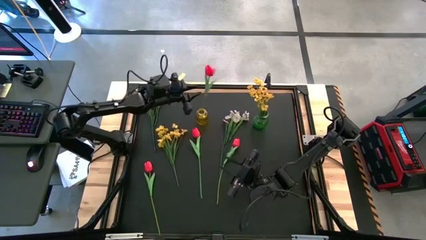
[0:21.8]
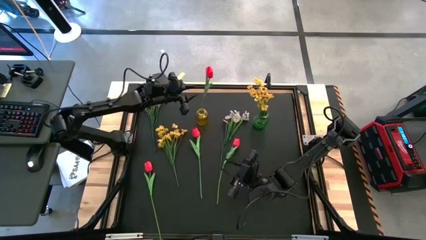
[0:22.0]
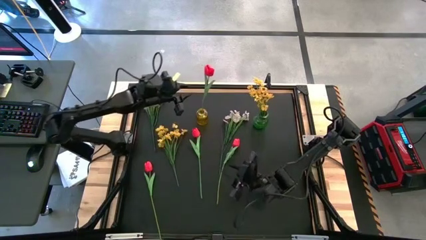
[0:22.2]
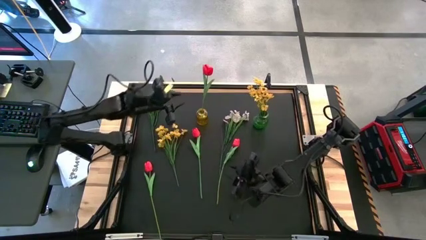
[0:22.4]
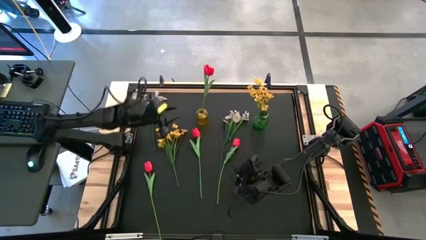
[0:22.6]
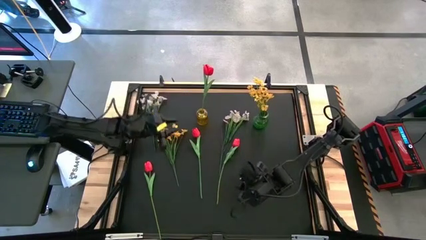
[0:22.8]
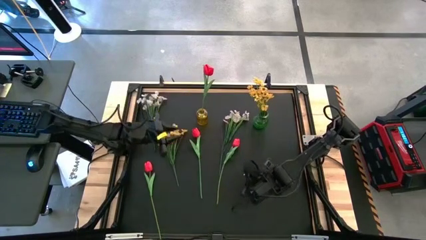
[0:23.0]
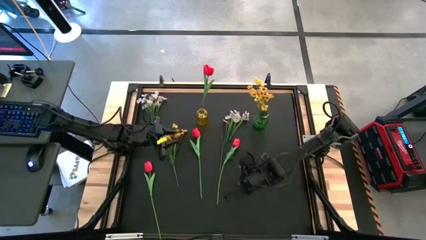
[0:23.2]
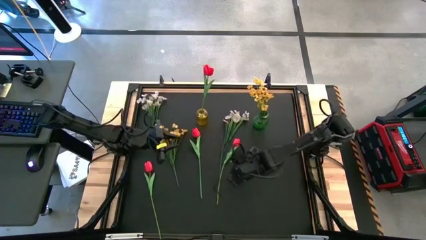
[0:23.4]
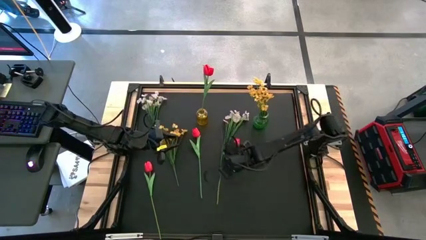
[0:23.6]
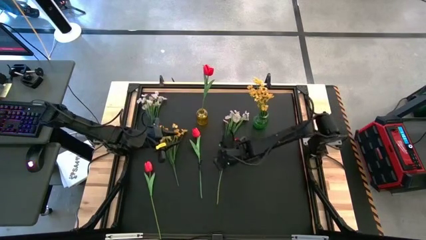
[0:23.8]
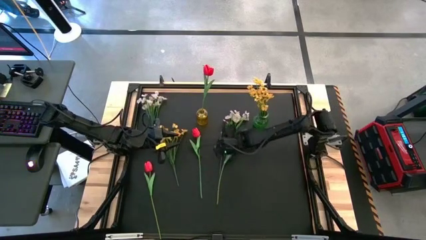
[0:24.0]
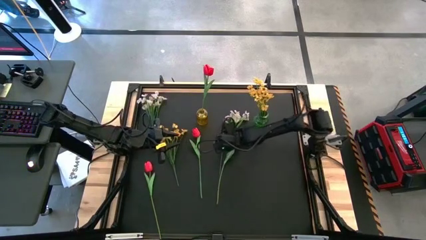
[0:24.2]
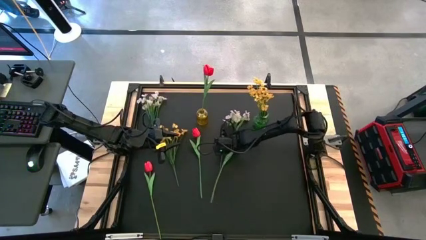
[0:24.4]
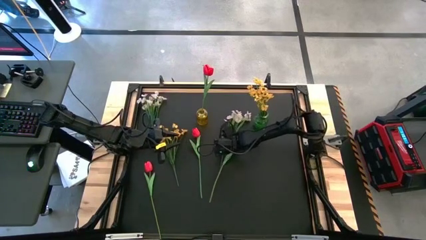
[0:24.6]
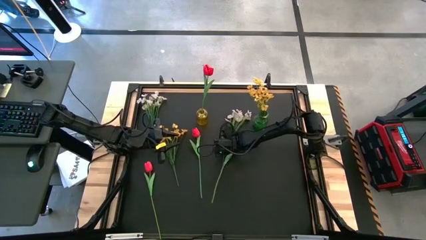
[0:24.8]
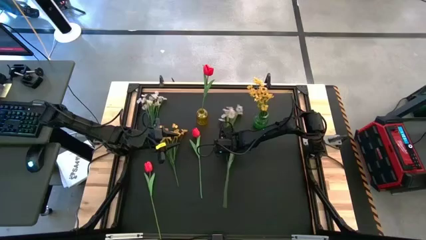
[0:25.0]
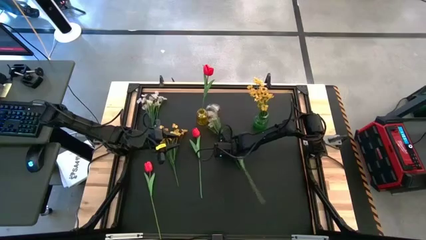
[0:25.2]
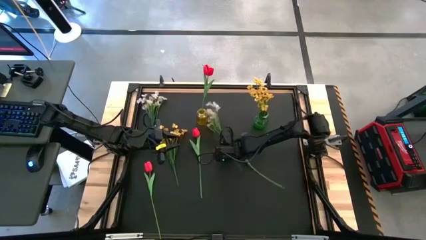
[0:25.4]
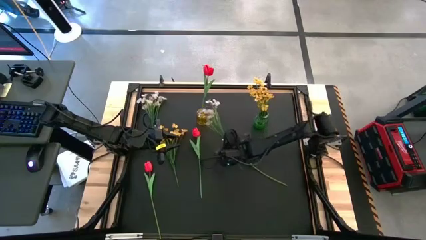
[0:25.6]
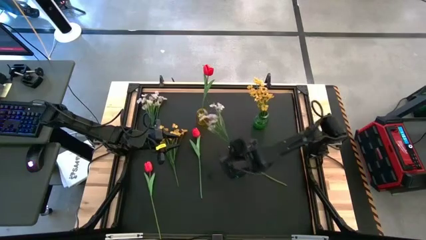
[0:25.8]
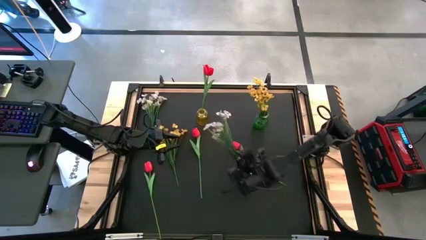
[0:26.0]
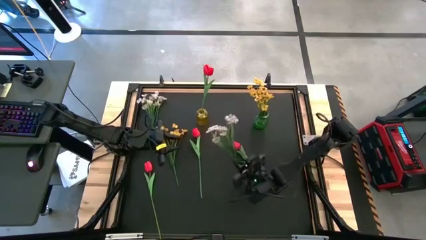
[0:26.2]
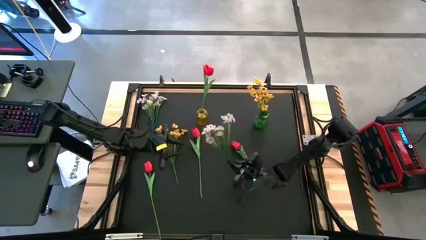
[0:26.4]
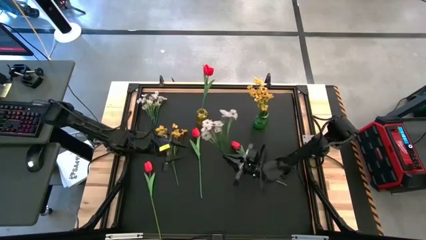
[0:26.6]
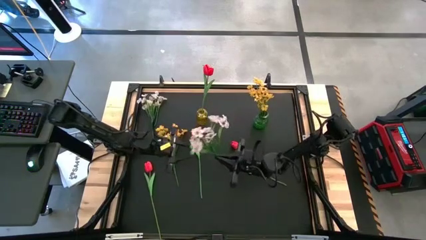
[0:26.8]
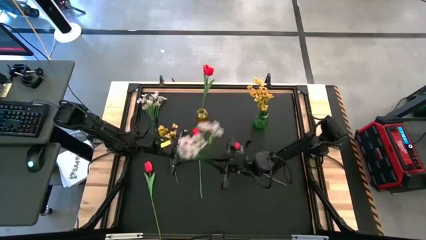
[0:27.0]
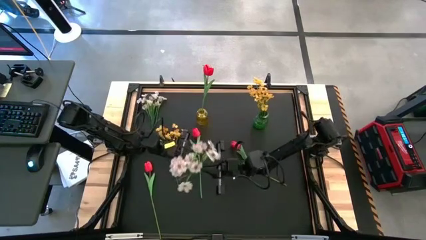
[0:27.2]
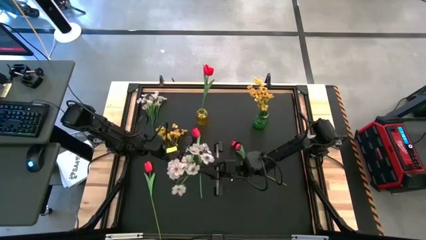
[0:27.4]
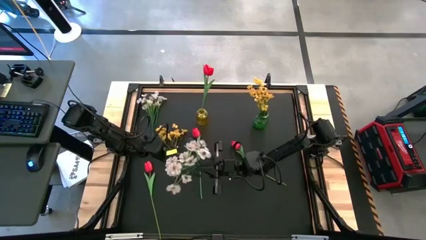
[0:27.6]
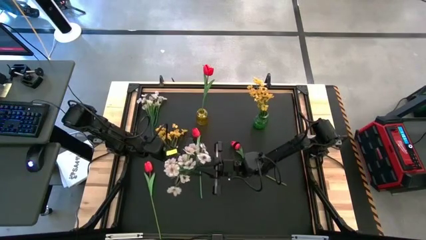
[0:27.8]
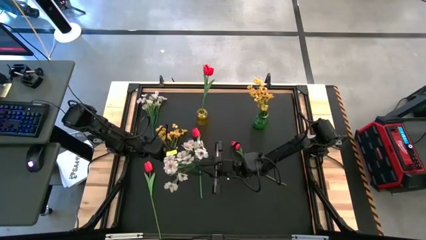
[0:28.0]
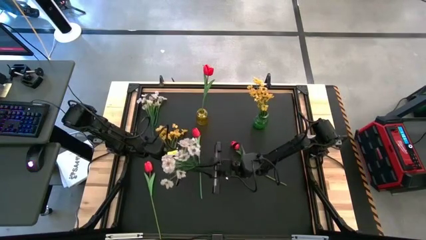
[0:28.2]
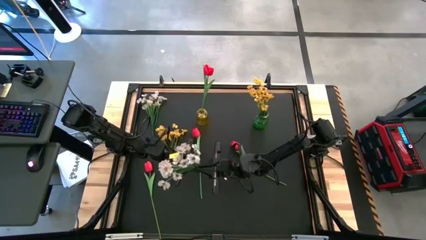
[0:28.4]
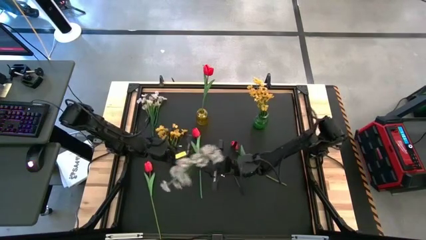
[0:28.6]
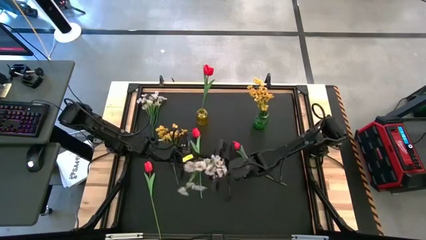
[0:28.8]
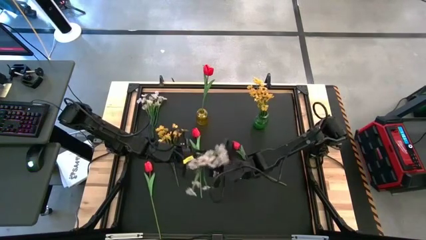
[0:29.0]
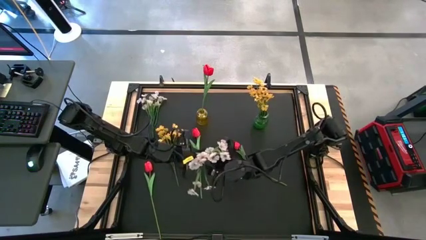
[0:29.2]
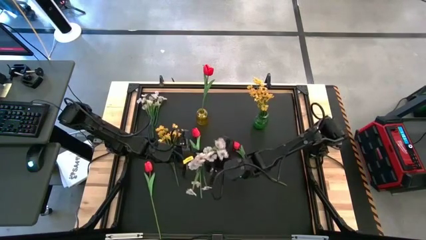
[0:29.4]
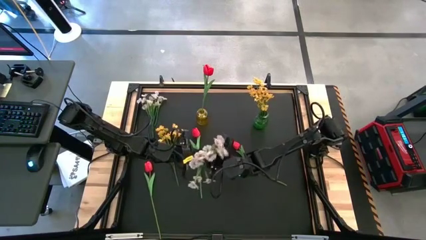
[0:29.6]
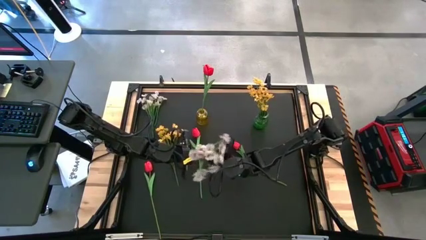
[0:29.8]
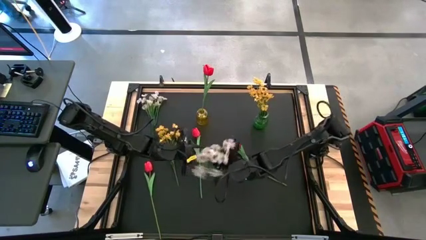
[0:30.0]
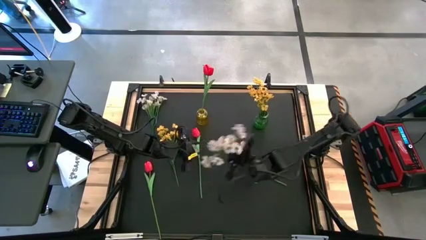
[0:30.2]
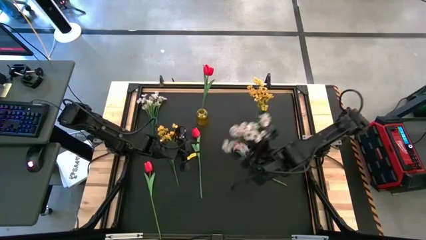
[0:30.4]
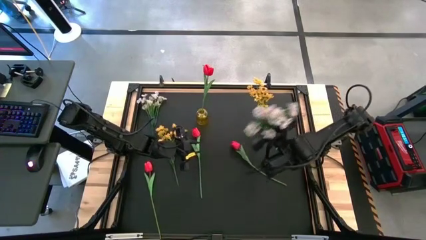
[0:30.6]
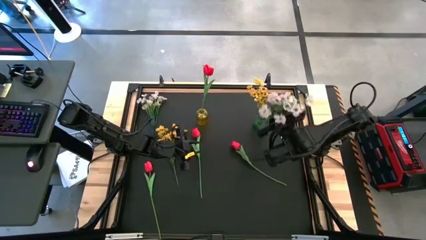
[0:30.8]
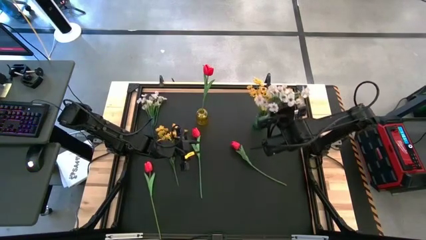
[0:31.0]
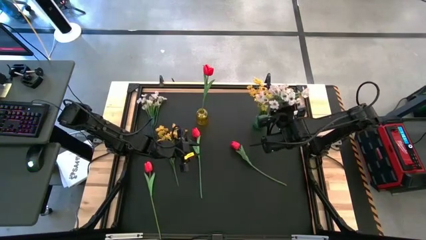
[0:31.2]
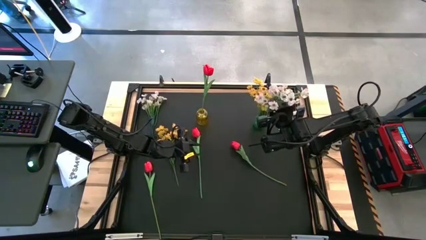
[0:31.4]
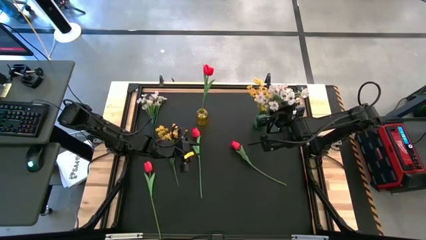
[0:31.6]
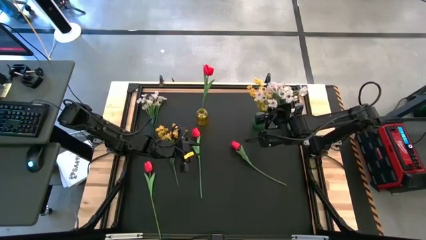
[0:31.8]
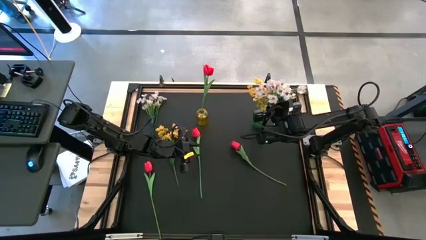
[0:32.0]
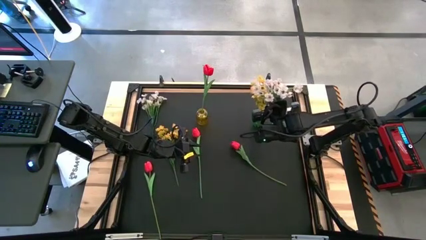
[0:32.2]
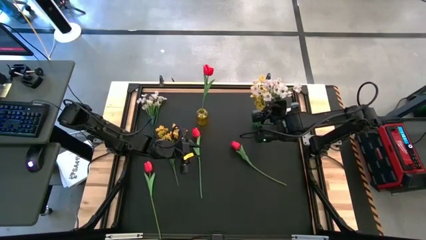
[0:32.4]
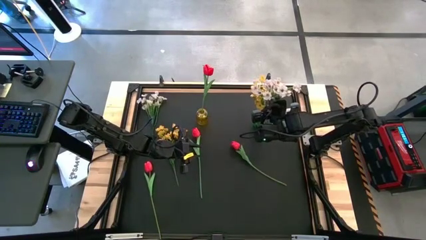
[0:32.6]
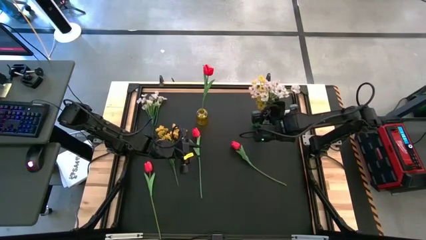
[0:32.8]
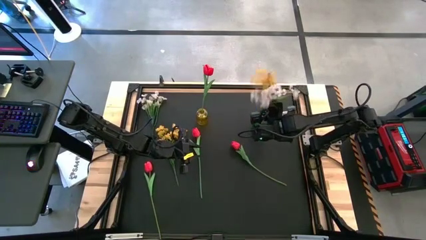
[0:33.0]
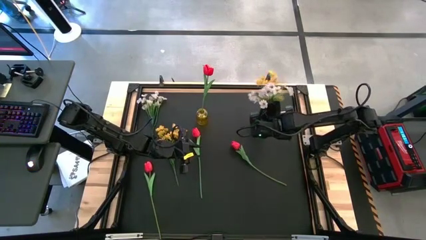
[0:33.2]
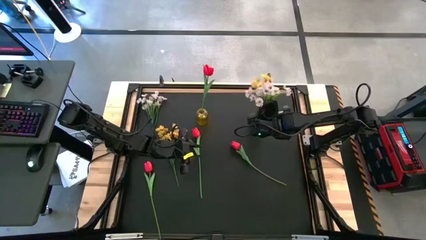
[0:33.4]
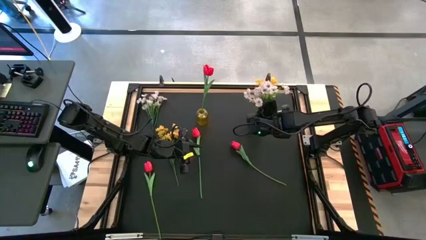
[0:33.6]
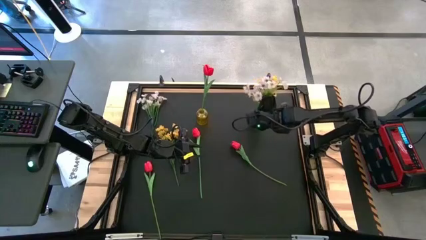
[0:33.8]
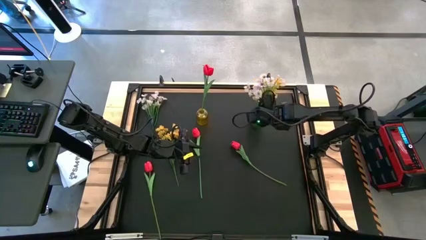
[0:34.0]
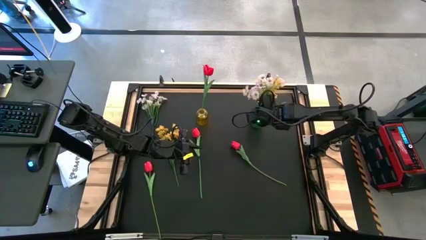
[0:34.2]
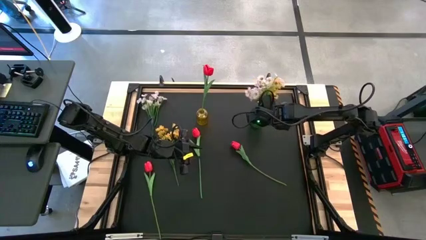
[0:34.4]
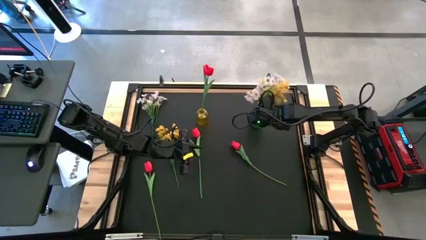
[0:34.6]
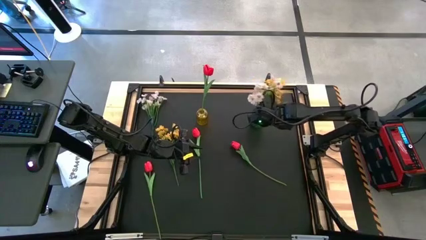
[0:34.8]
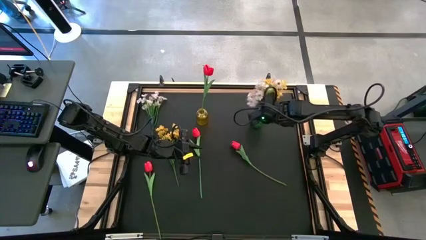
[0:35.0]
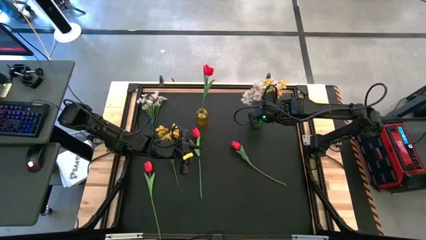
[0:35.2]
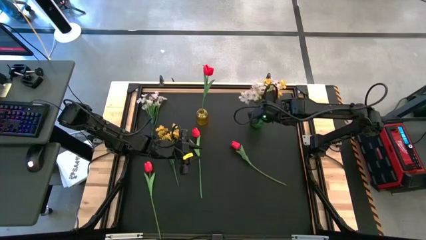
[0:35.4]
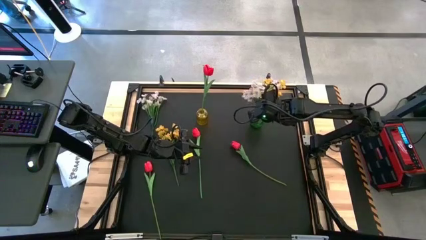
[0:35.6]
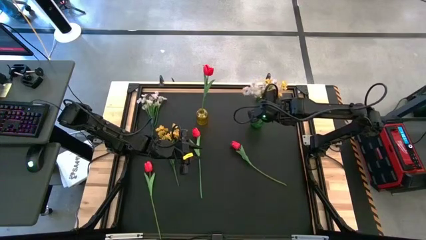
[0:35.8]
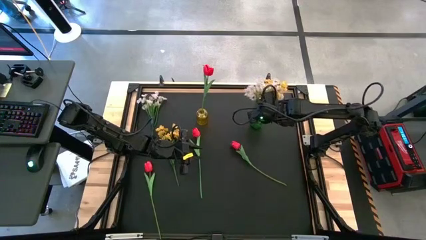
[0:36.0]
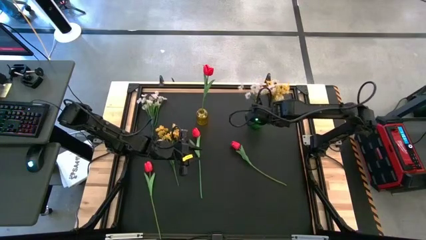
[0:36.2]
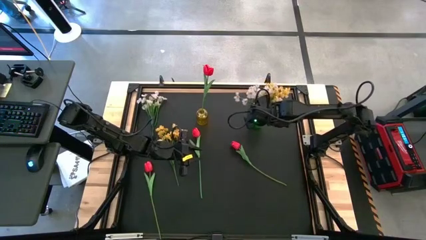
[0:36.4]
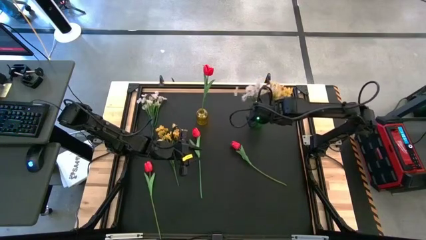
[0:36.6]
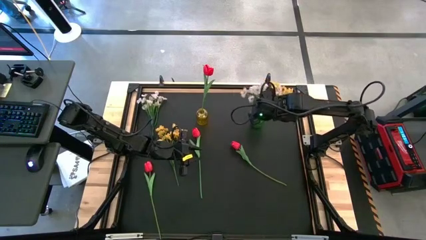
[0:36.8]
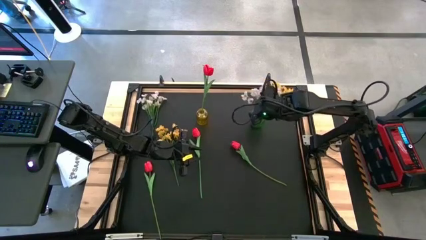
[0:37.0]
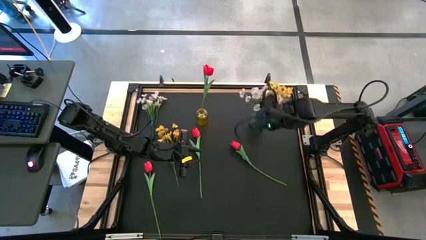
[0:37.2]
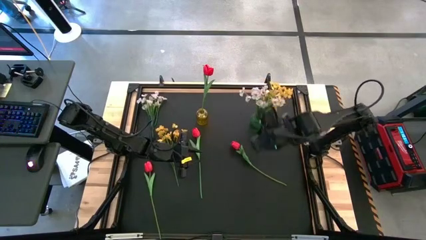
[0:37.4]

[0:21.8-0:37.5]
Task: Sort flowers into vase by color
Put the white flowers into the green vase
